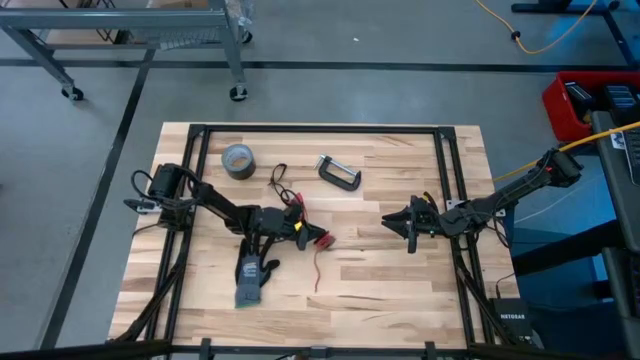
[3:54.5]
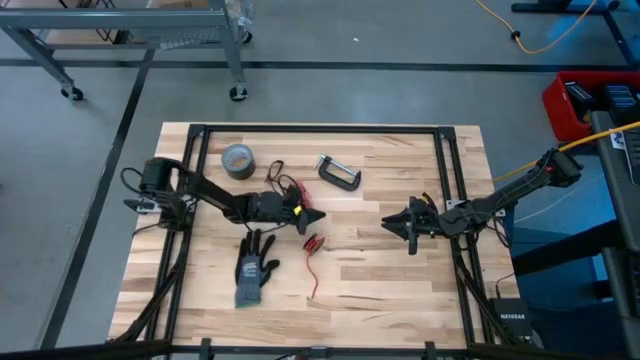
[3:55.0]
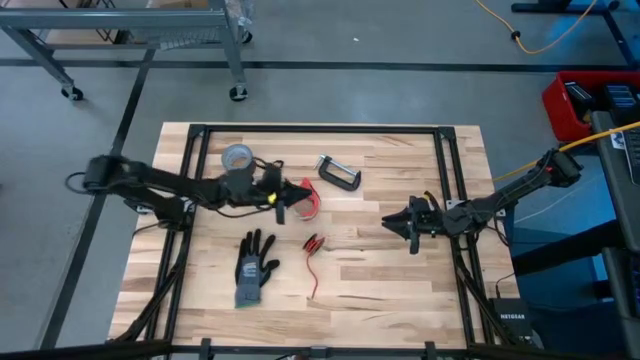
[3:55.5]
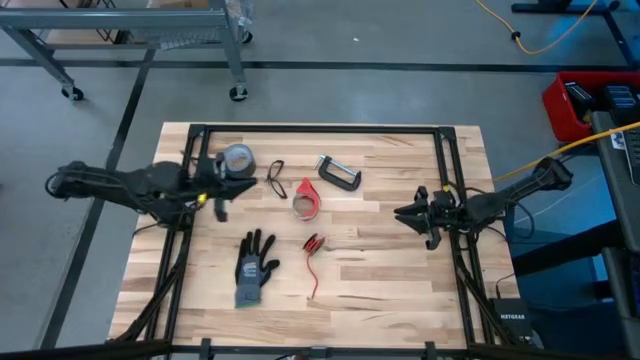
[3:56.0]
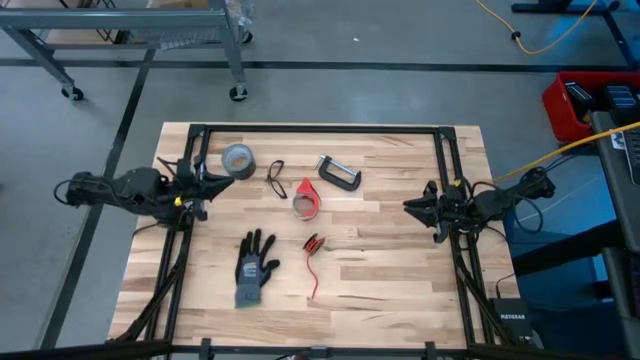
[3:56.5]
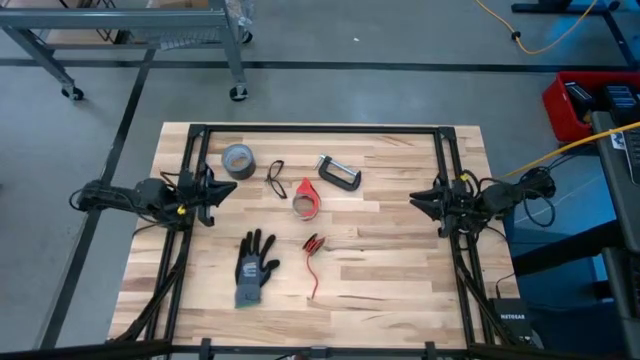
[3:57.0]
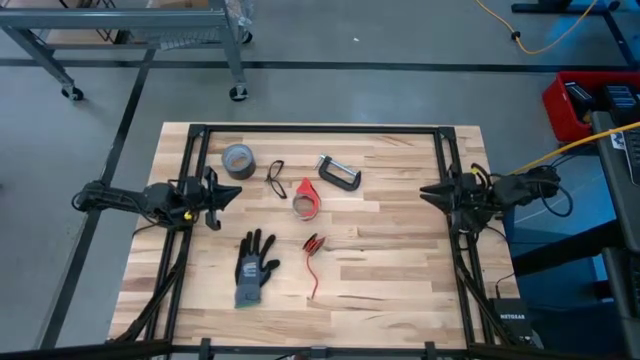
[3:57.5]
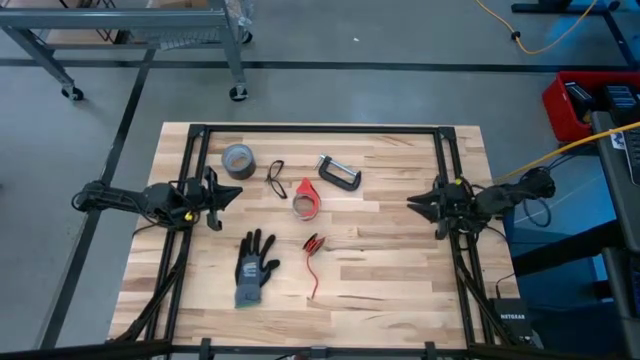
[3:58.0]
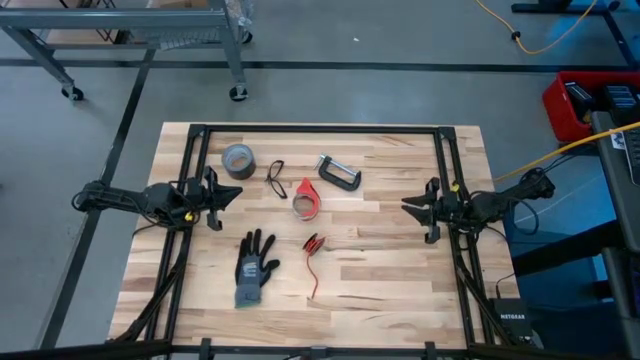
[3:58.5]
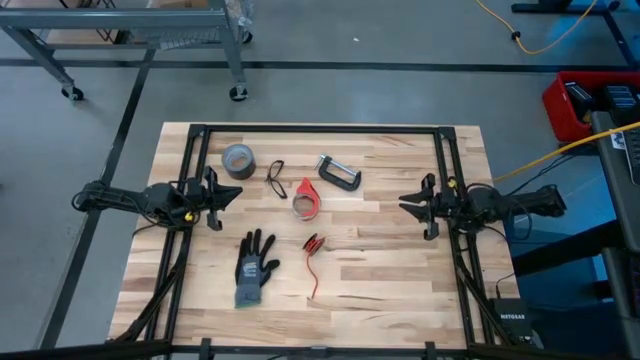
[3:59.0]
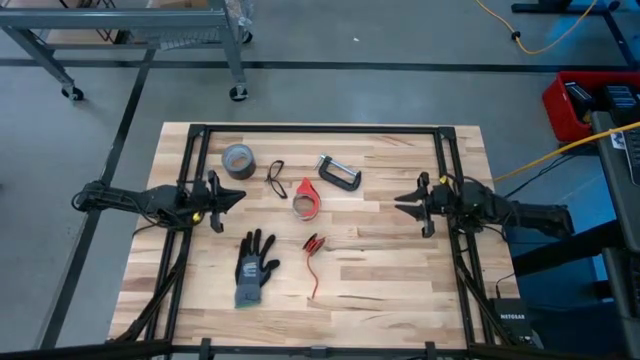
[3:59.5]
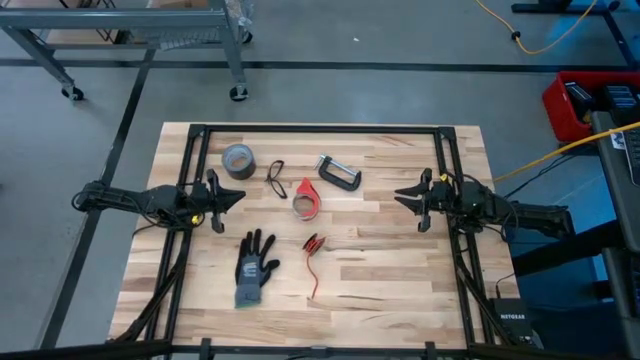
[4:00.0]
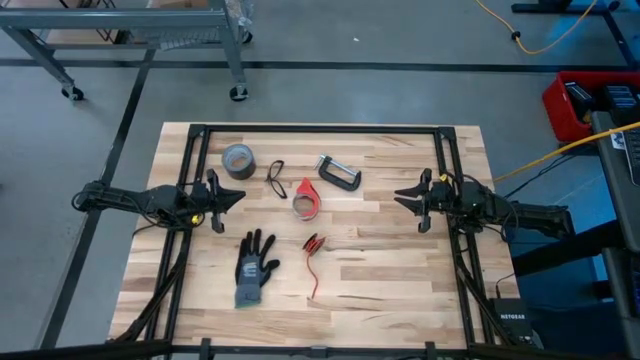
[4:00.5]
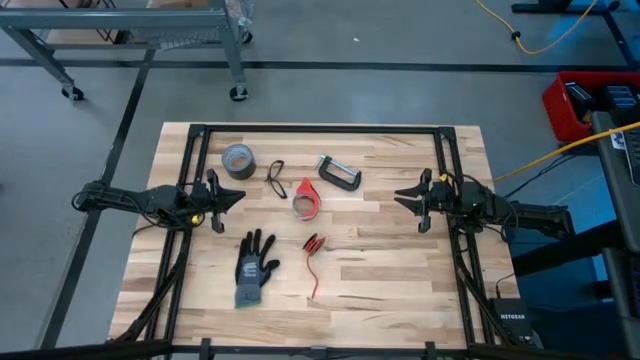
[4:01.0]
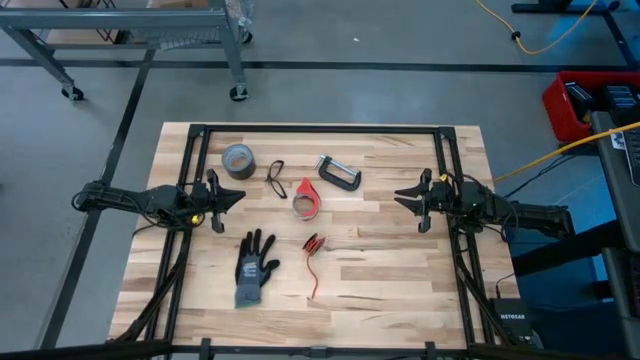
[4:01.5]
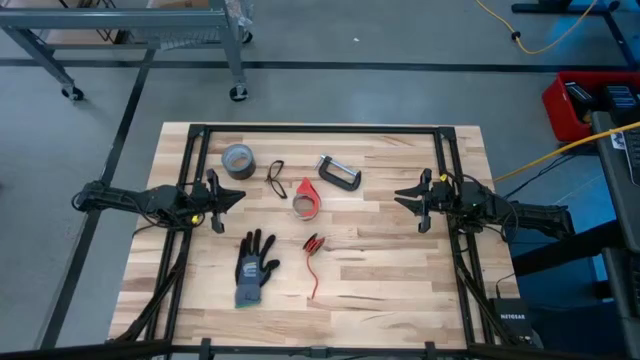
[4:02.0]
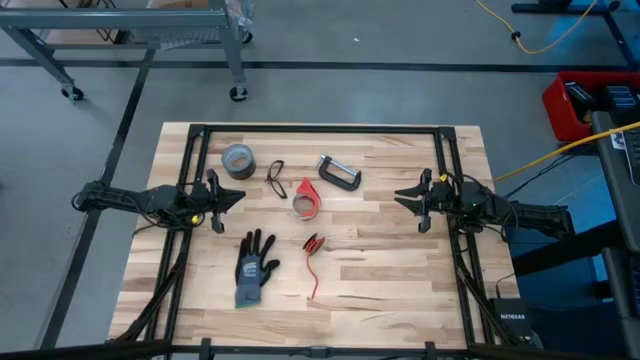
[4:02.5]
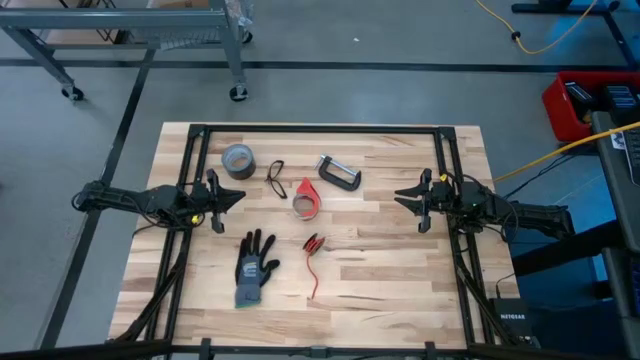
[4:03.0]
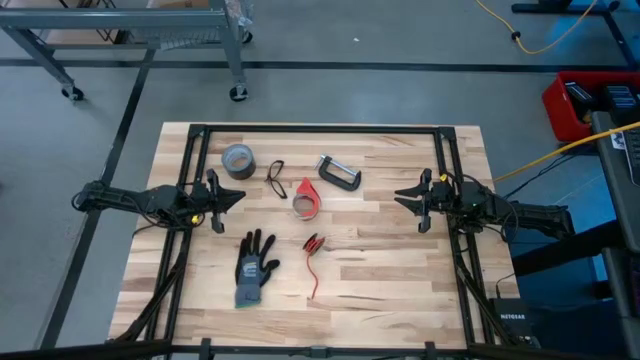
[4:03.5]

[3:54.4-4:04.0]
Task: Coil cords
Return to Home Position

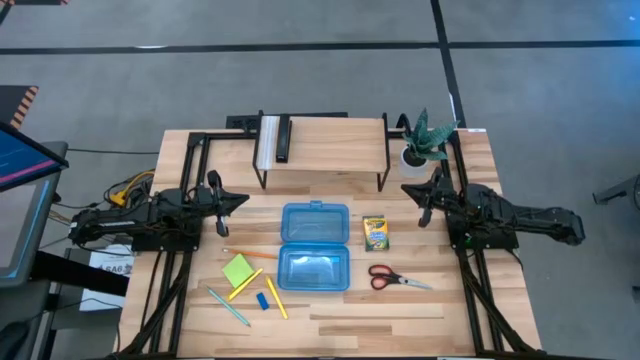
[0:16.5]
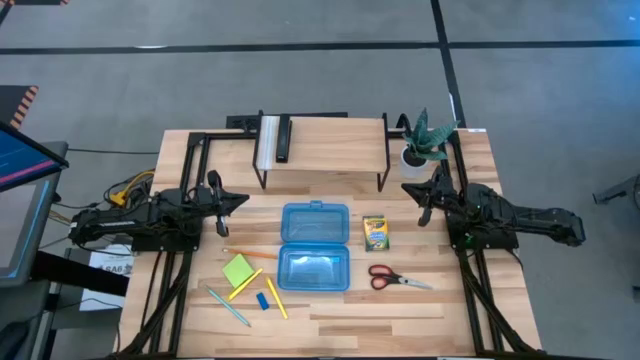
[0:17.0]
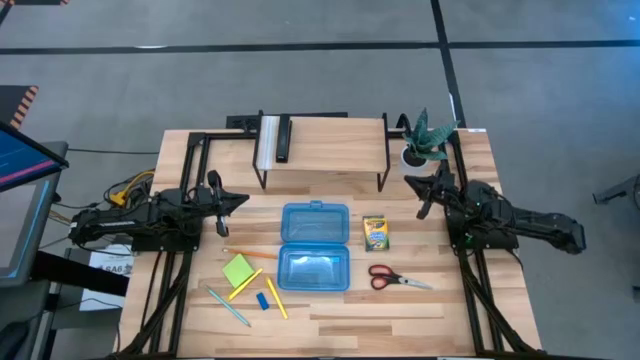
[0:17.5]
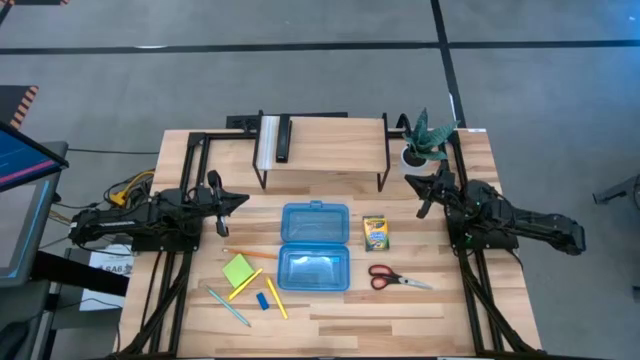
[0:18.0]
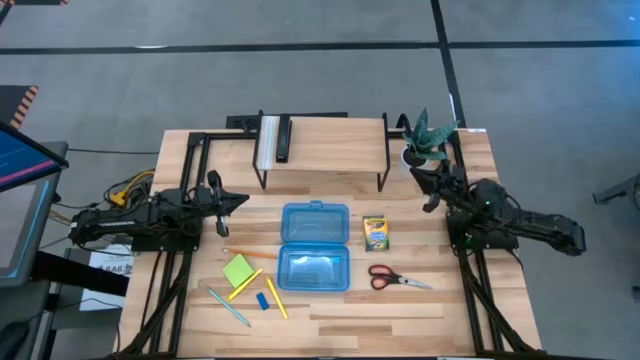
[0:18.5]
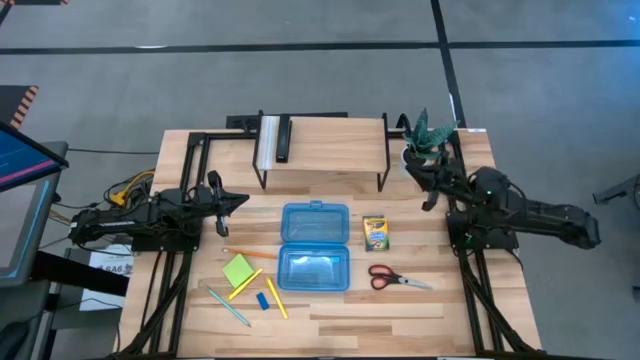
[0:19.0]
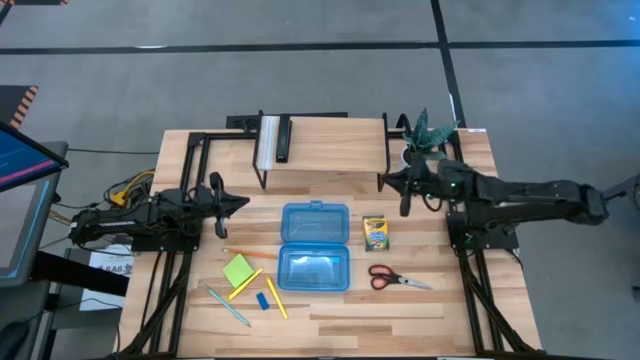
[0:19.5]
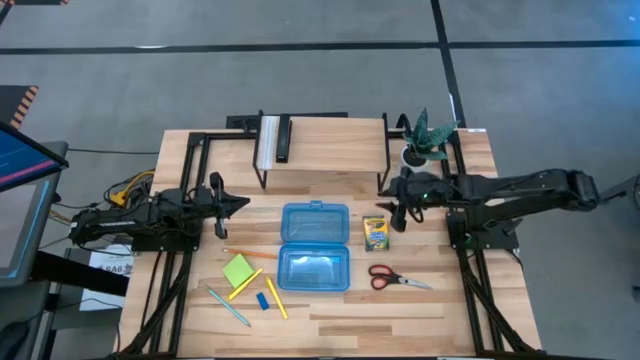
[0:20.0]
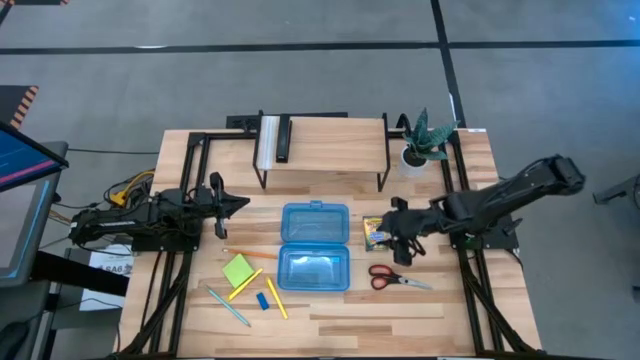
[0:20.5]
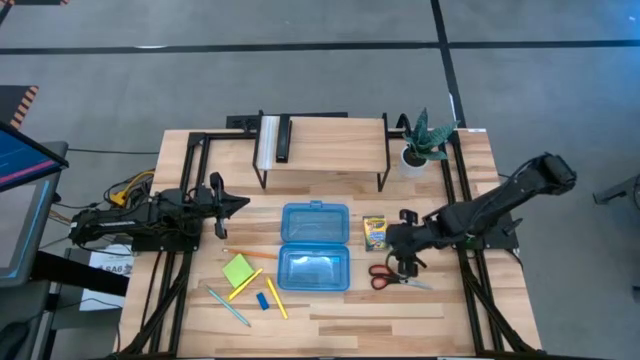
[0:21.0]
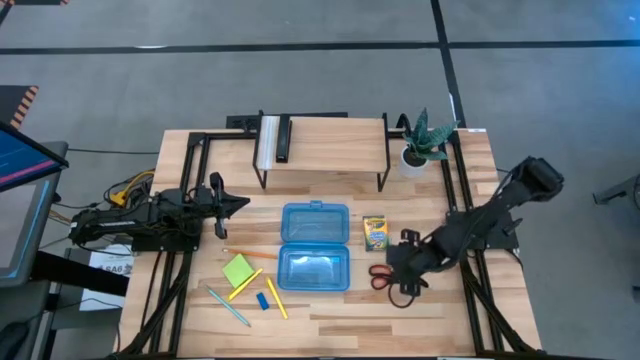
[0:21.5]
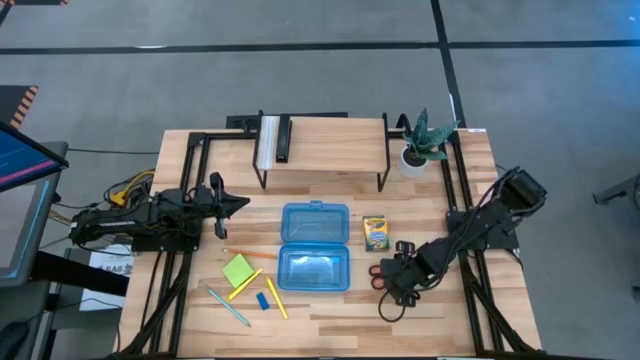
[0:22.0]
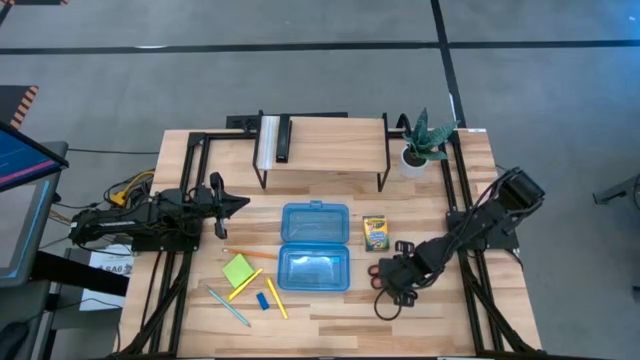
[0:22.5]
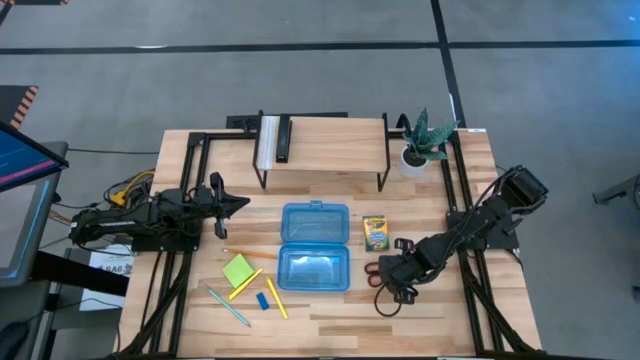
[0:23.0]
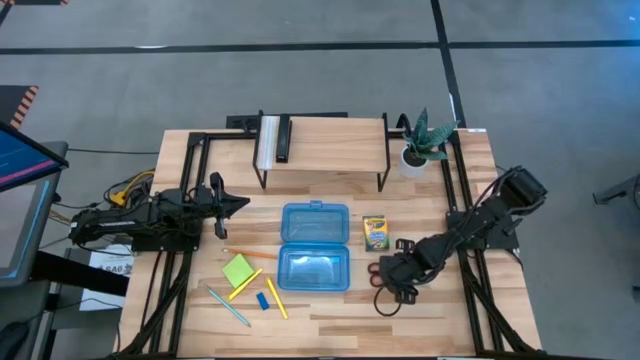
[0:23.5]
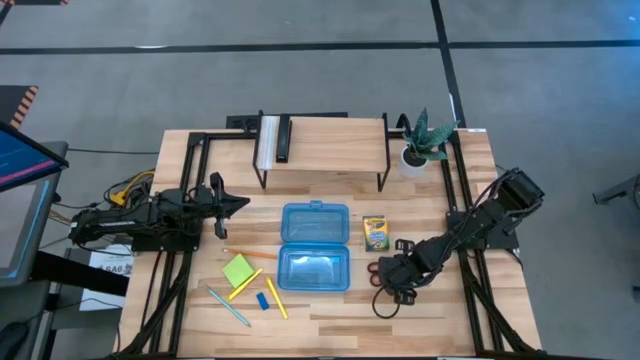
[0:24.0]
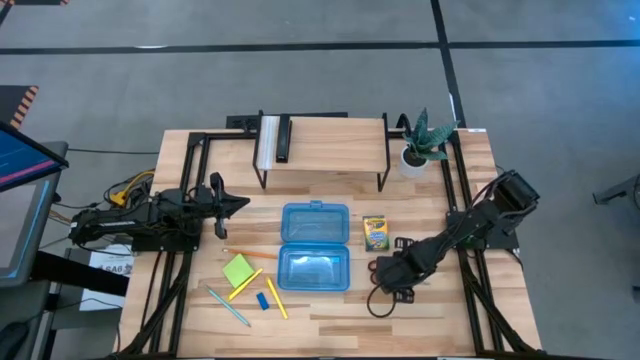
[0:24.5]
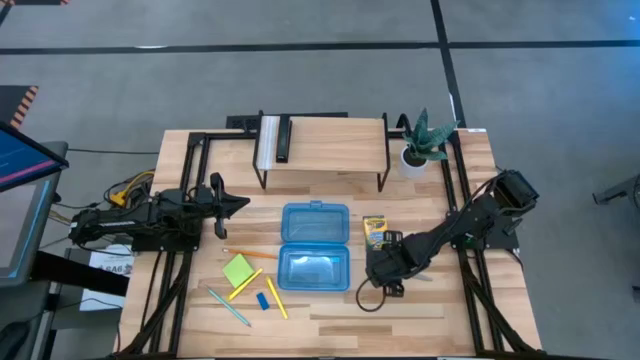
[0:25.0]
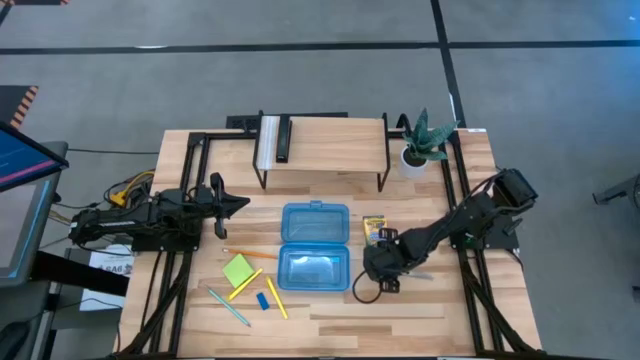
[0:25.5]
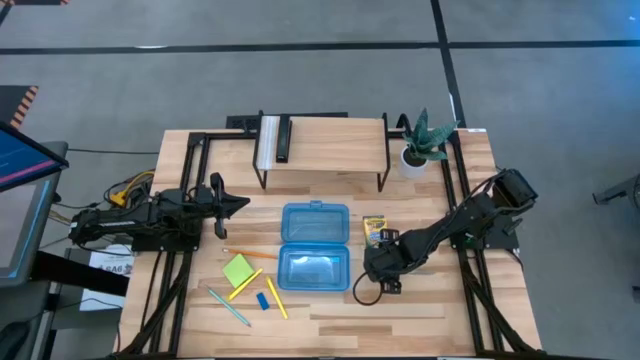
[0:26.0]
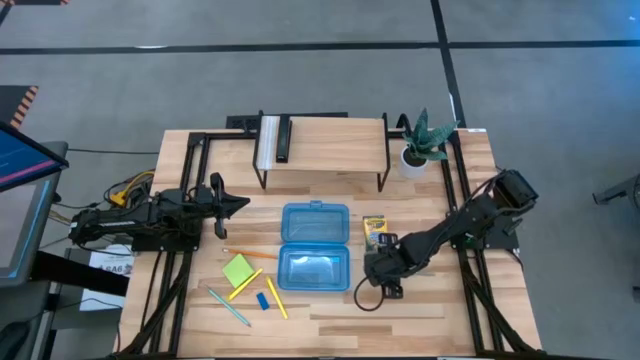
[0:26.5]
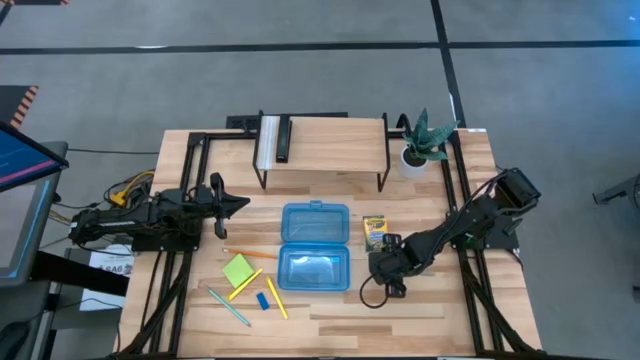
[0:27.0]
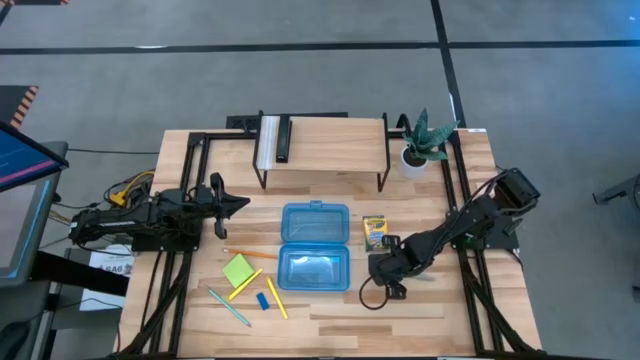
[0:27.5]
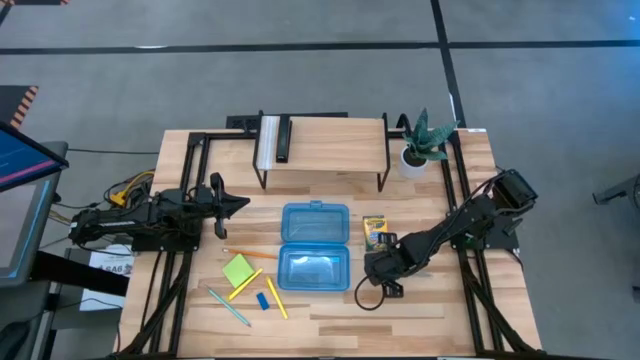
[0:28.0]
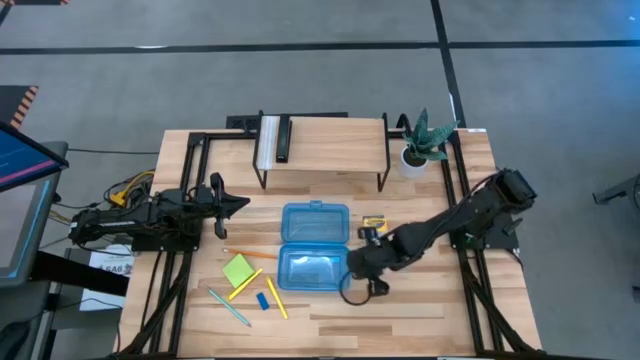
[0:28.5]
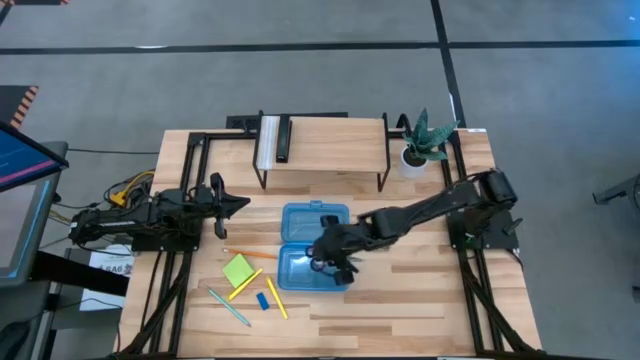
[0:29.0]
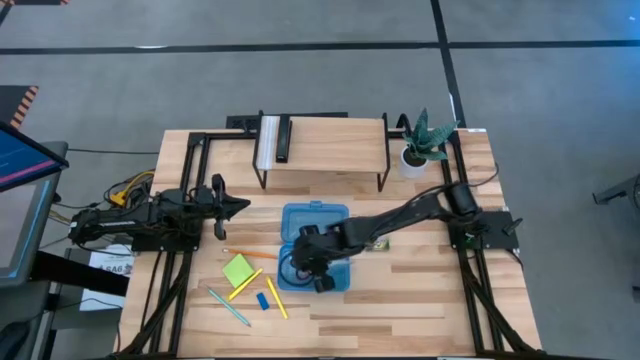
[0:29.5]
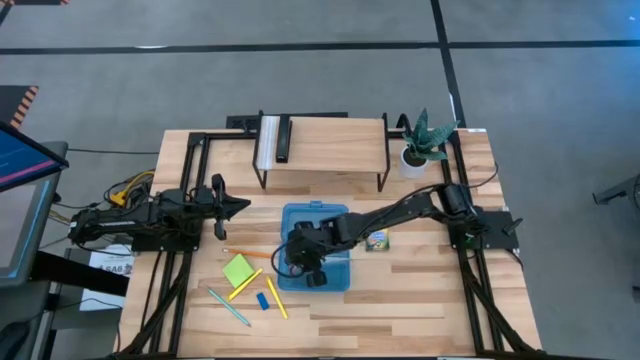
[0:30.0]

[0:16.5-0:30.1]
Task: Pack school essentials
Put the black scissors into the blue supply box
